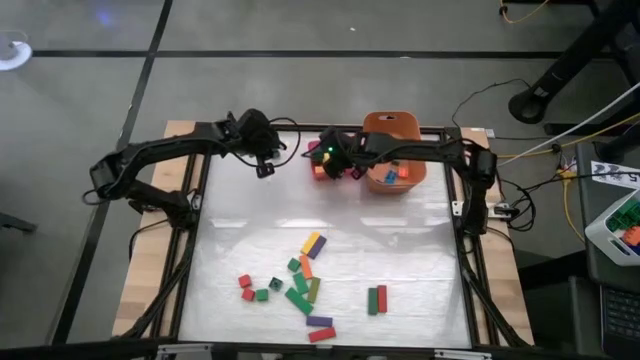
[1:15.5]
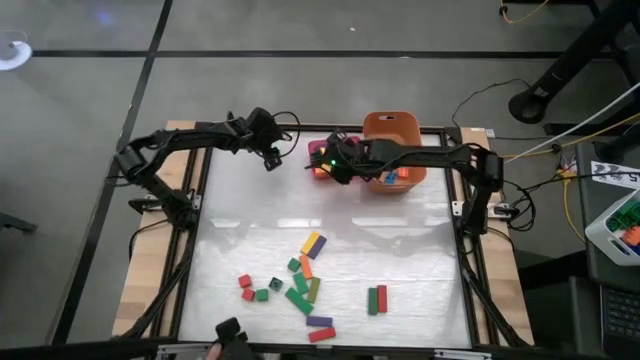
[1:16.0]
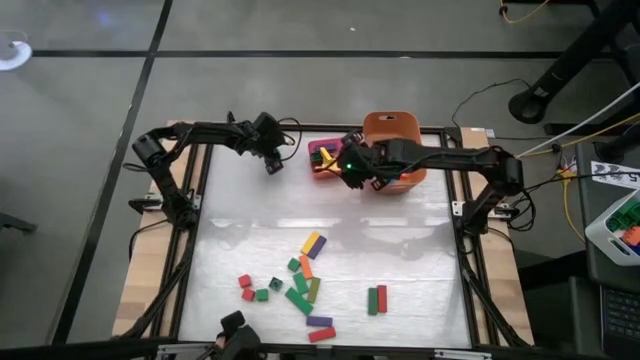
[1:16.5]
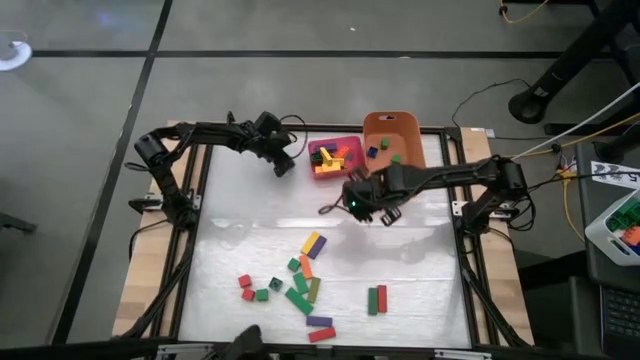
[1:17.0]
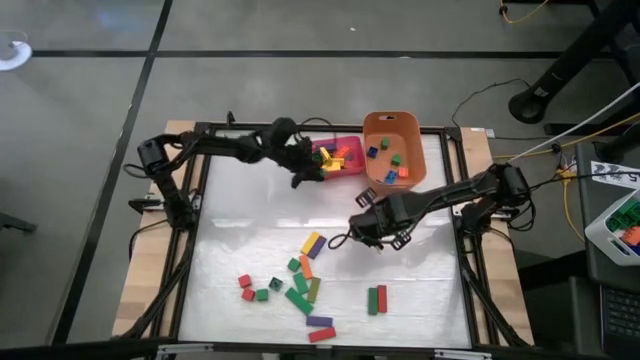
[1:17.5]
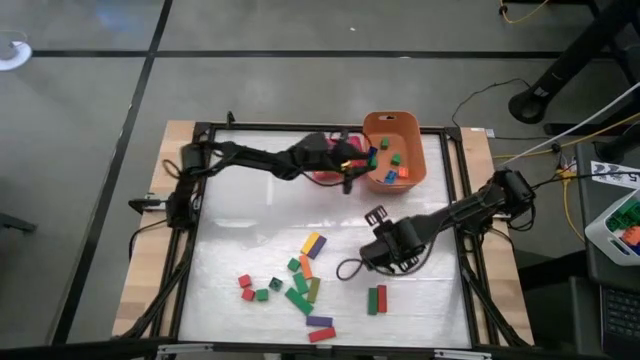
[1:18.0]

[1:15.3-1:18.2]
Task: Sort blocks by size
Put the small green game piece into the orange bin

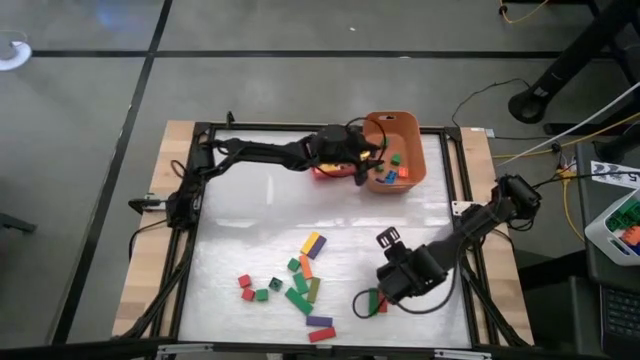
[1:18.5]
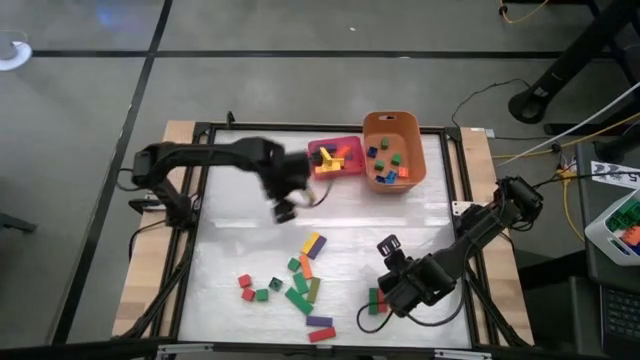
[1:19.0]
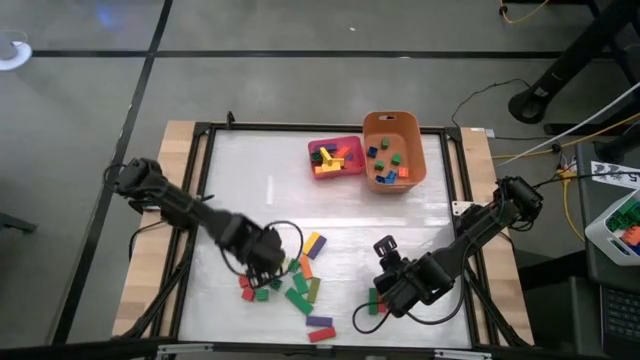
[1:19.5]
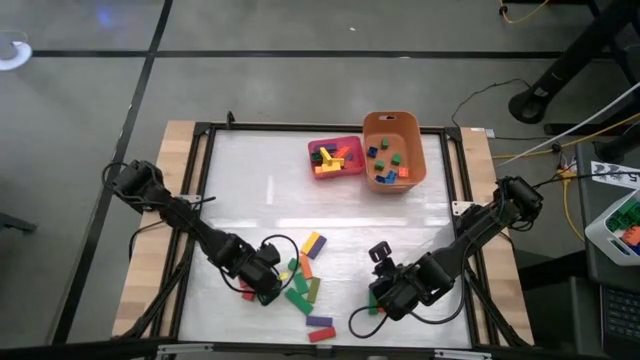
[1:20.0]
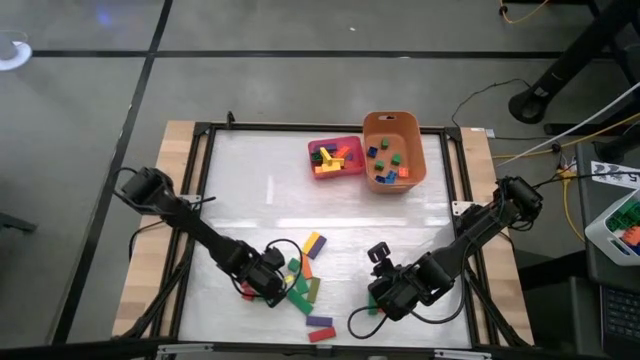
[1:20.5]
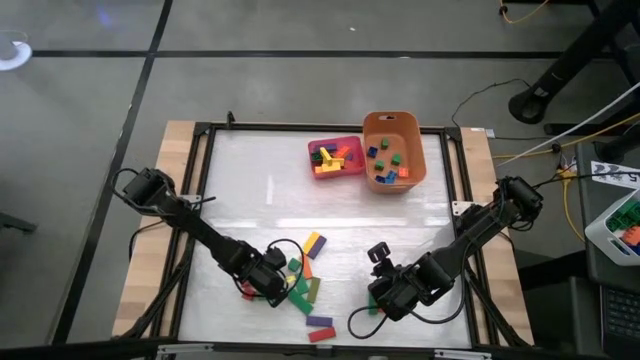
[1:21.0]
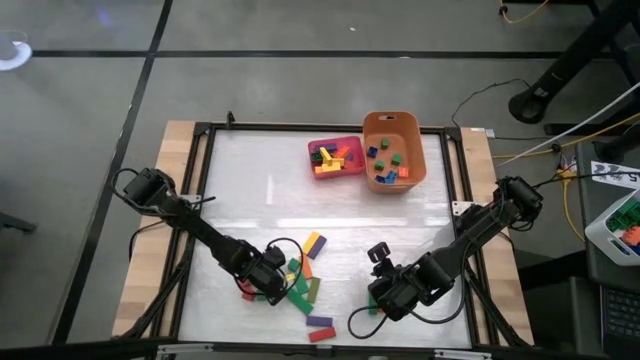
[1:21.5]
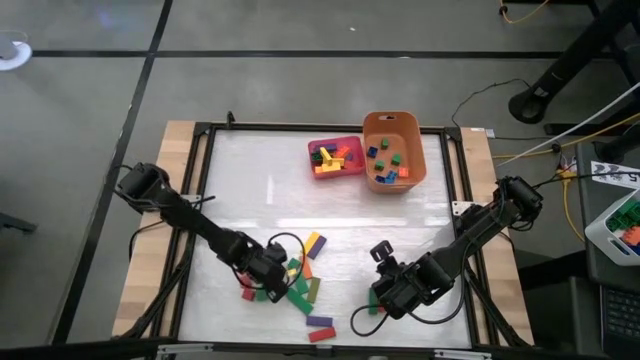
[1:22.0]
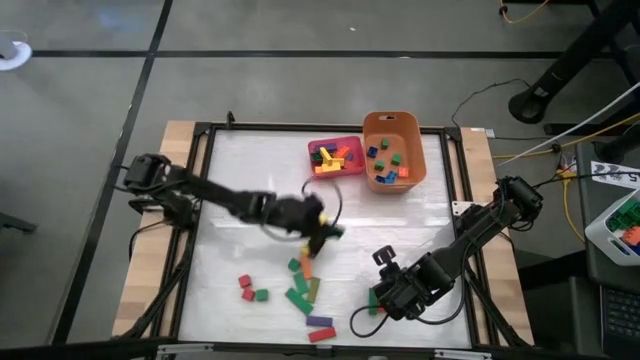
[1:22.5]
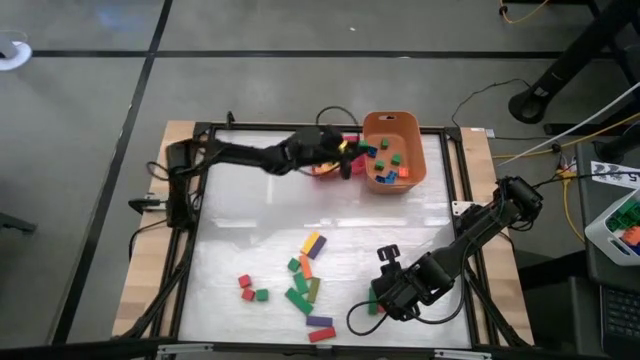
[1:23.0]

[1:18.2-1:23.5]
Put the small green game piece into the orange bin

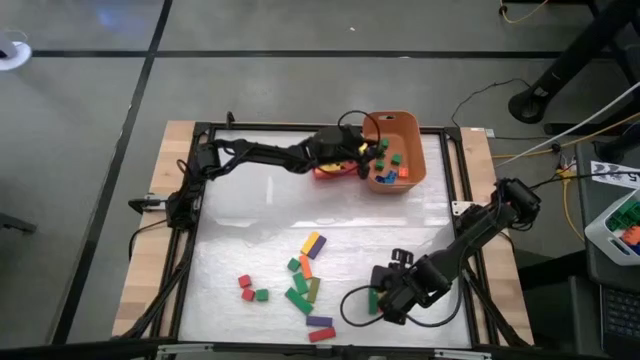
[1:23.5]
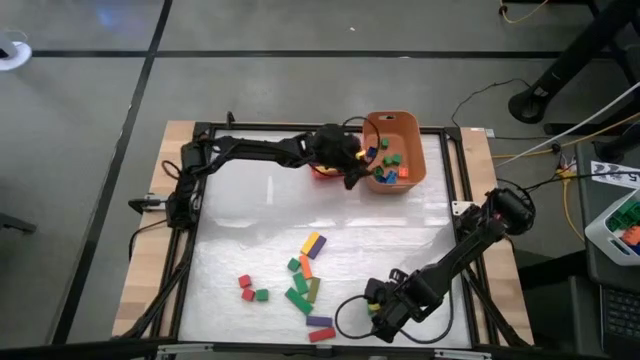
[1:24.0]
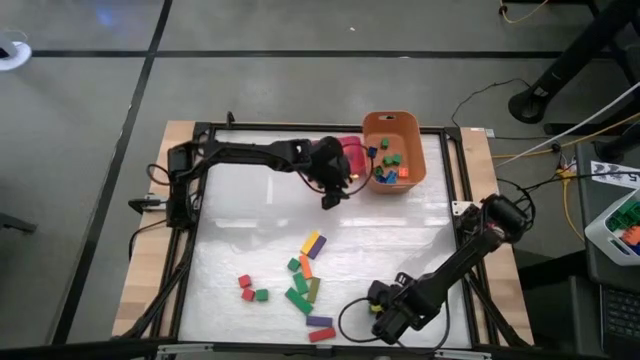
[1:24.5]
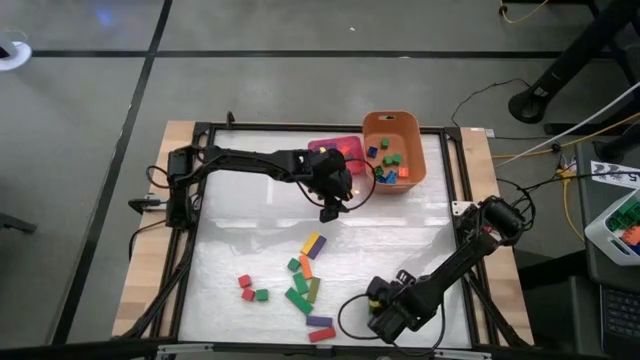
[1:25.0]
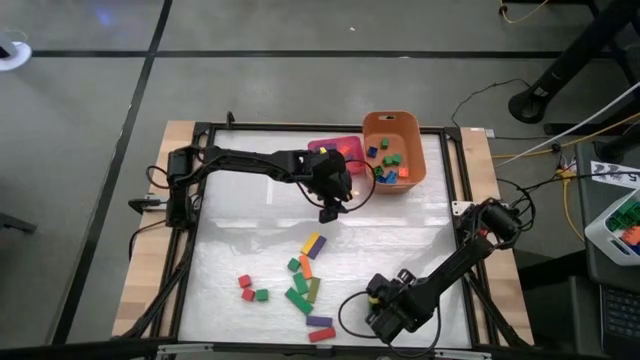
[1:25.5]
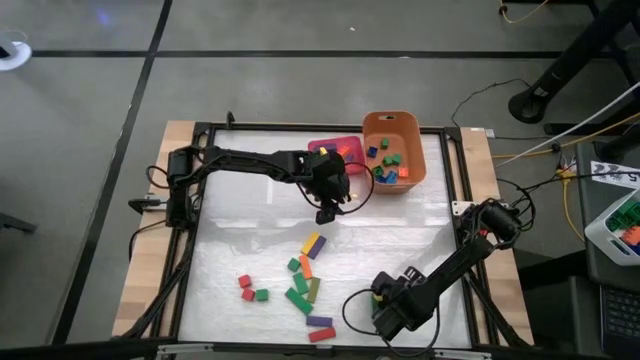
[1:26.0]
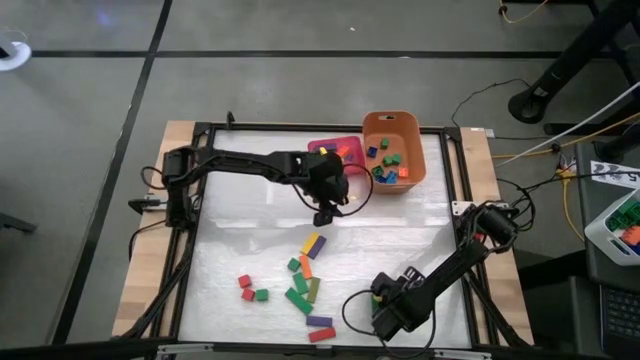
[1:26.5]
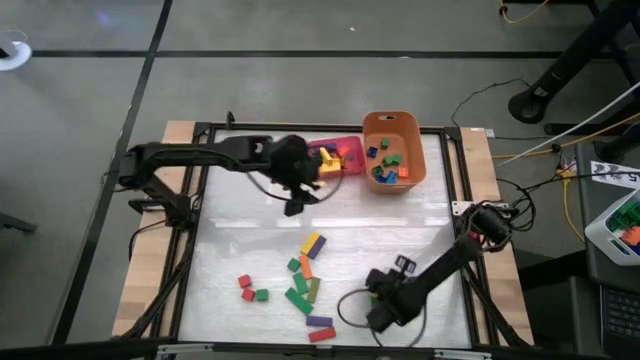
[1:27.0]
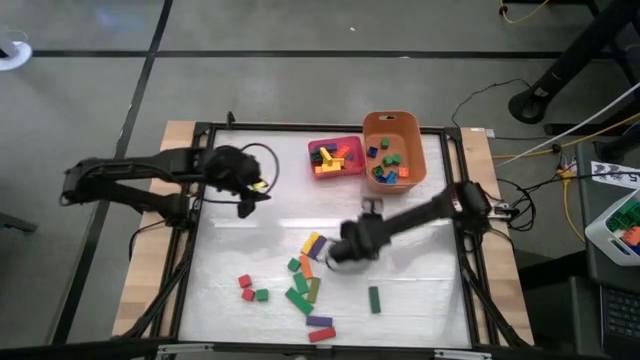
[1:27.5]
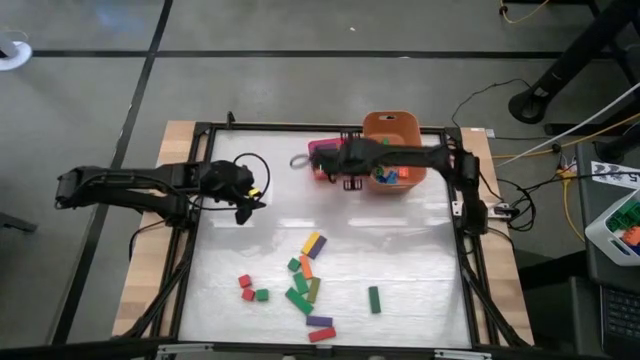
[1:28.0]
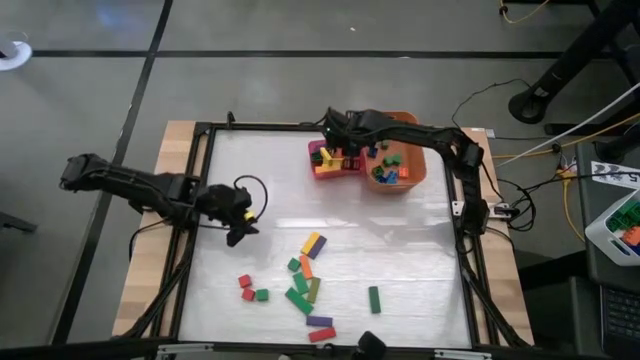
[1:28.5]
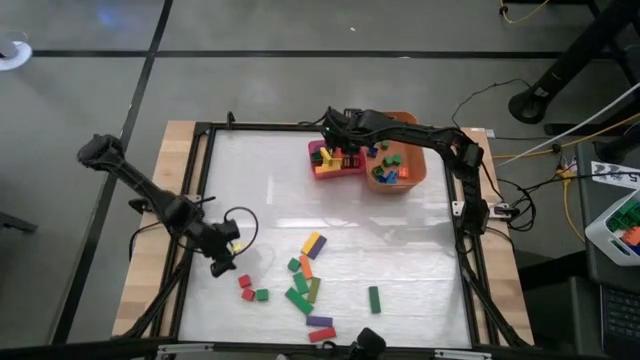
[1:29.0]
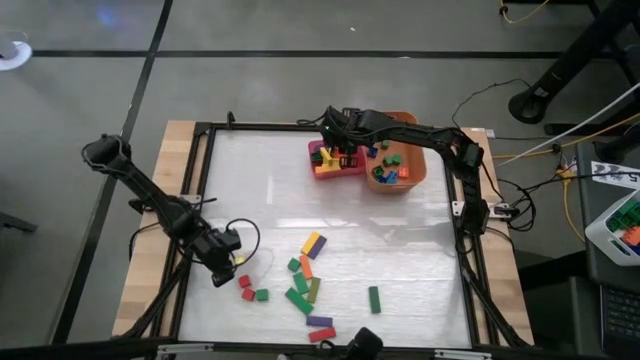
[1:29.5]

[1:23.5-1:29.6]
Put the large red block into the pink bin

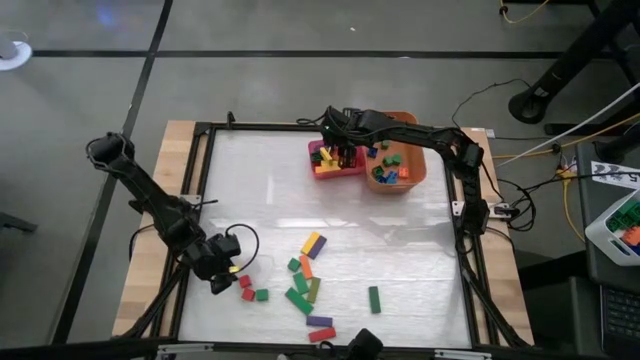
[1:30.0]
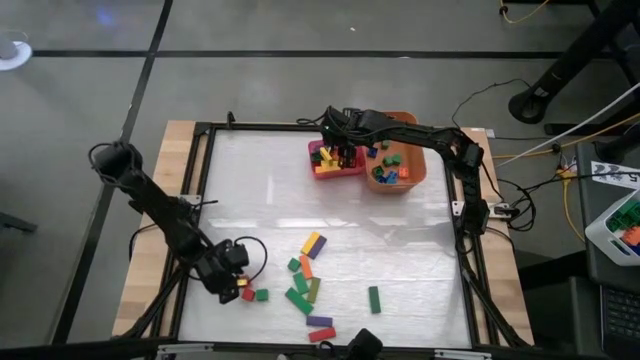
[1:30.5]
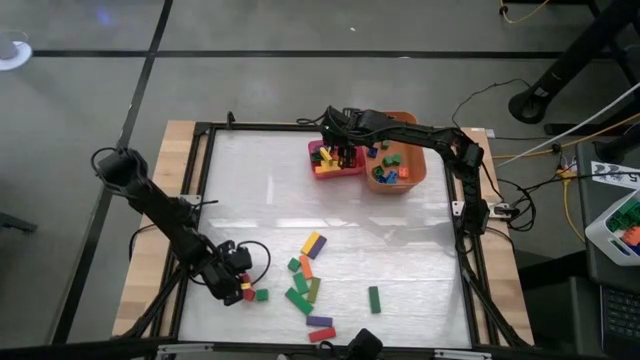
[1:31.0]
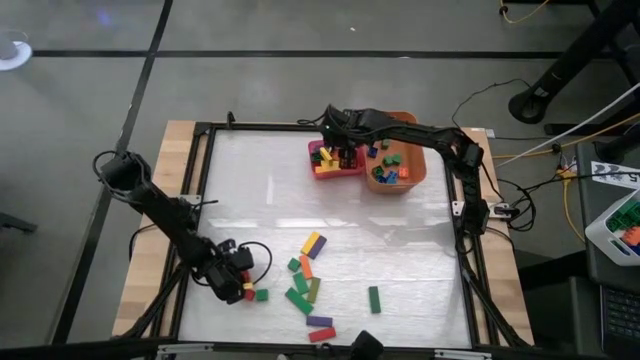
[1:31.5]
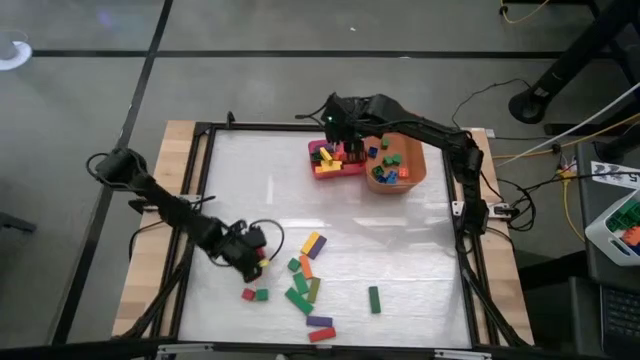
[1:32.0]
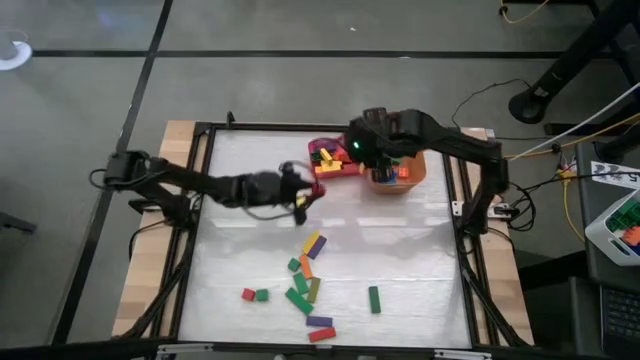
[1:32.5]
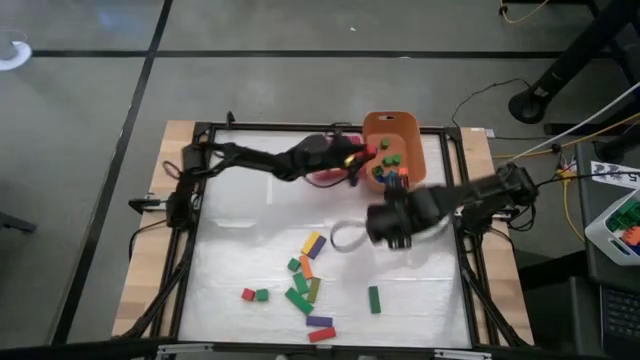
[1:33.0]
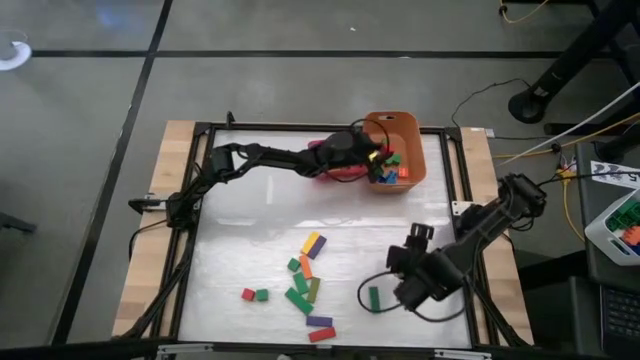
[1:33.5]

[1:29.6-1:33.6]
Put the small red block into the orange bin

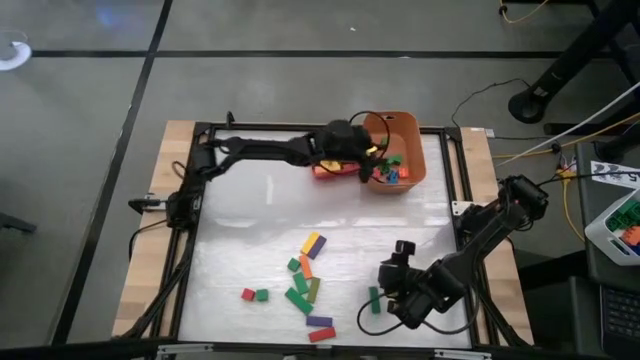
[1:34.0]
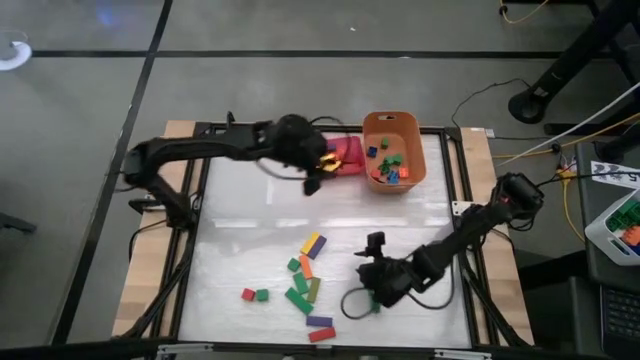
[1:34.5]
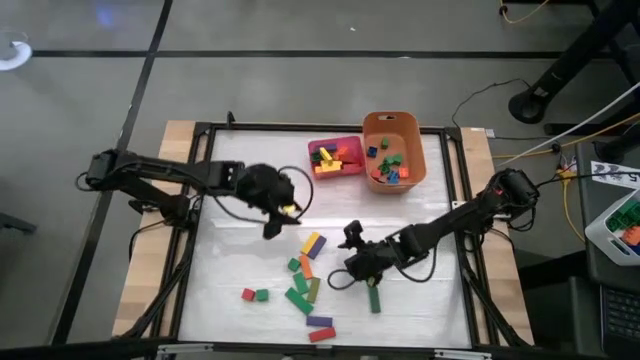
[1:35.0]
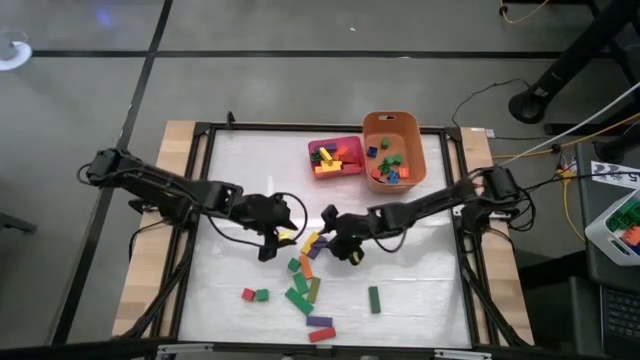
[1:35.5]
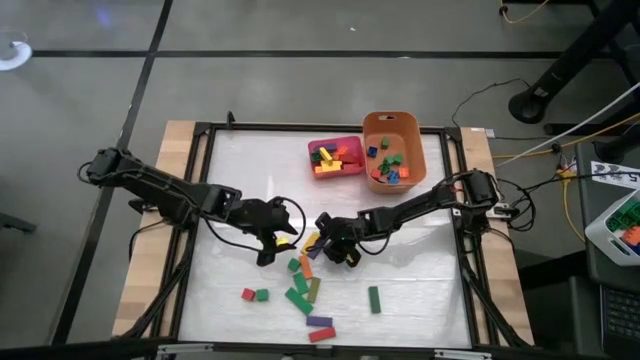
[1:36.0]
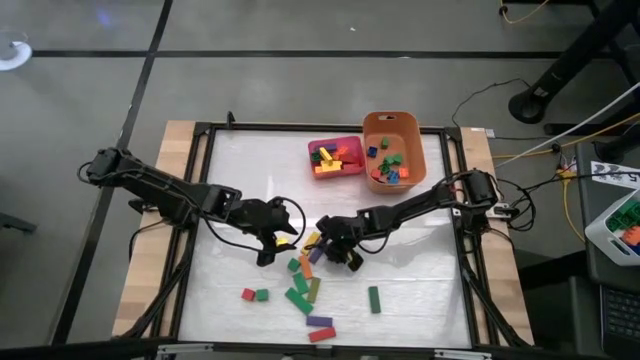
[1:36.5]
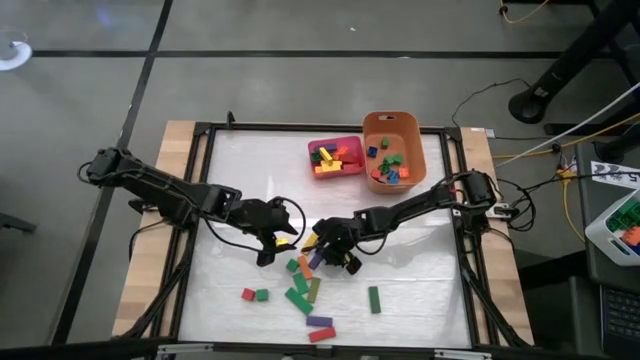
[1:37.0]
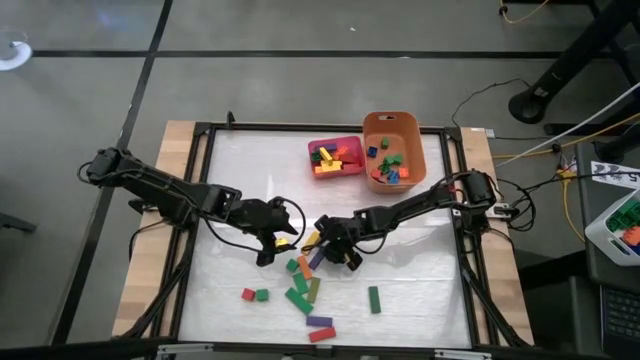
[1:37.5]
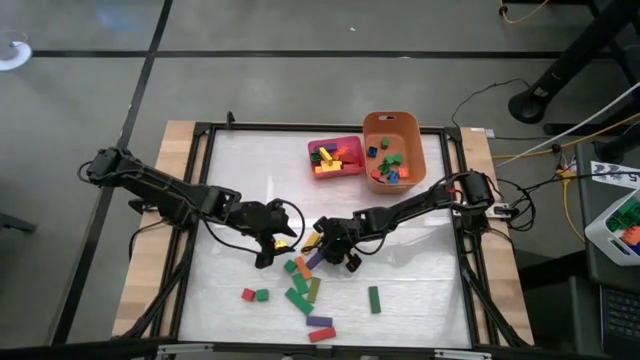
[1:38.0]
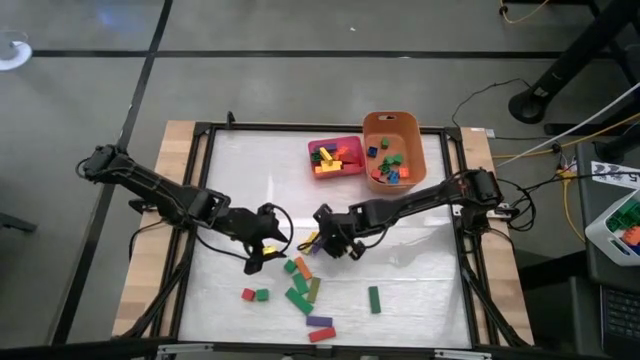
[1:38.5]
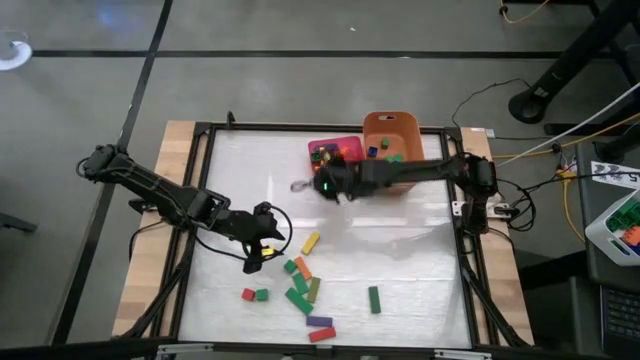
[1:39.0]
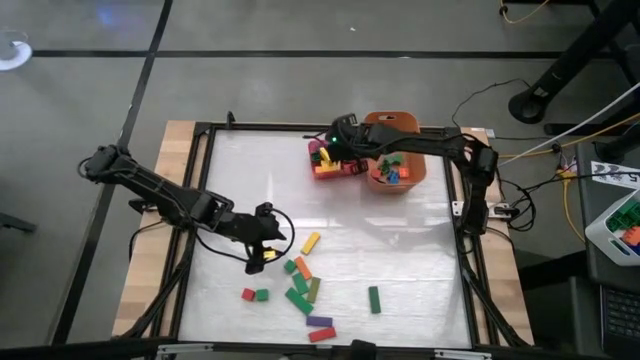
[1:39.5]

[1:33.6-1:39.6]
Put the large purple block into the pink bin
